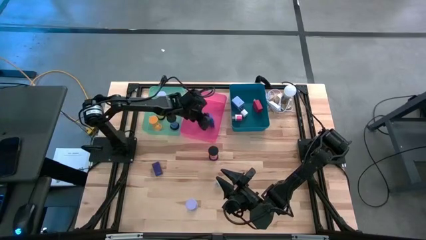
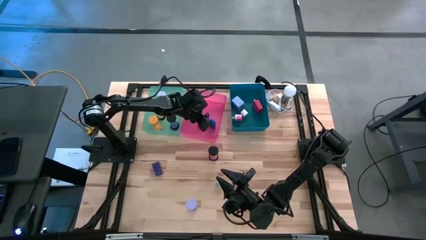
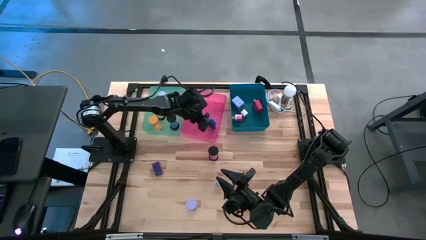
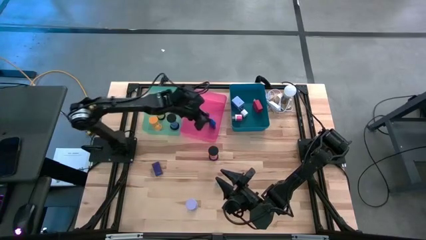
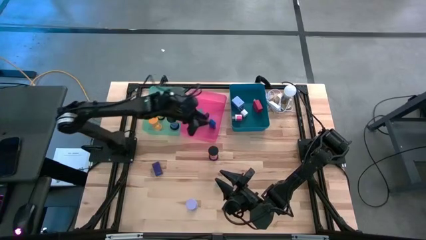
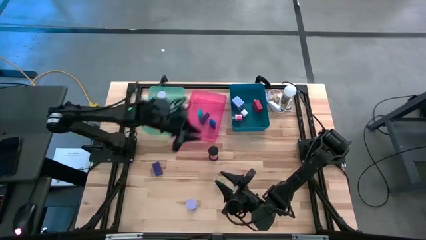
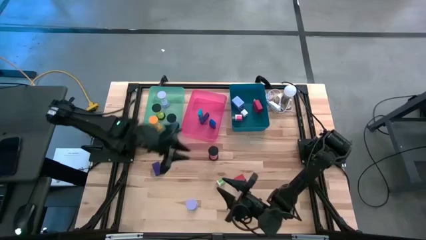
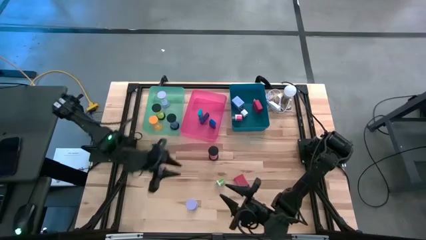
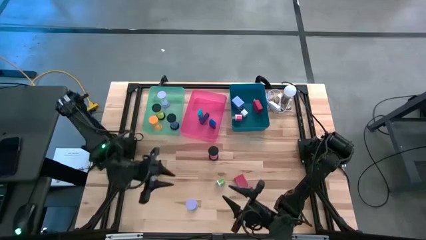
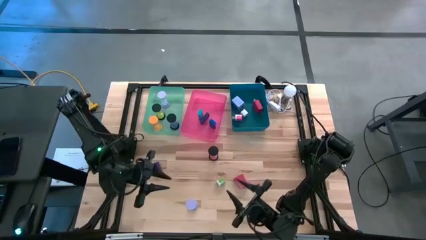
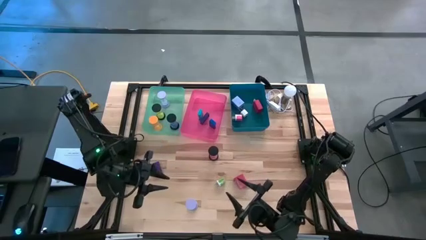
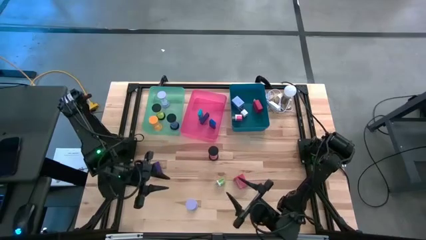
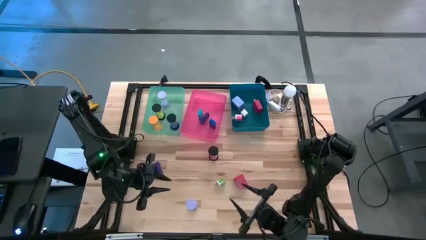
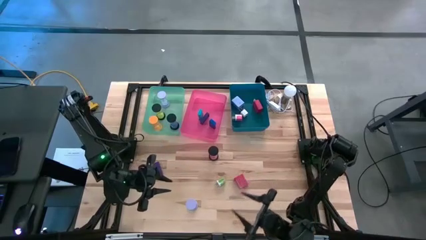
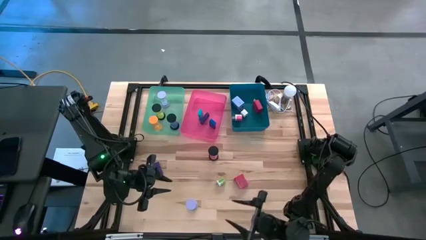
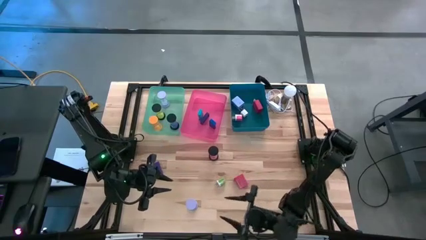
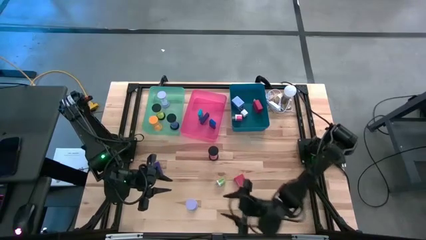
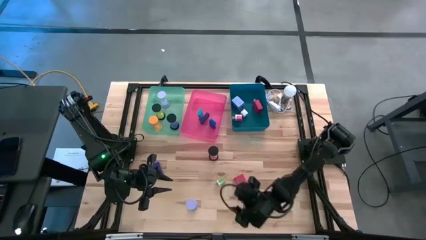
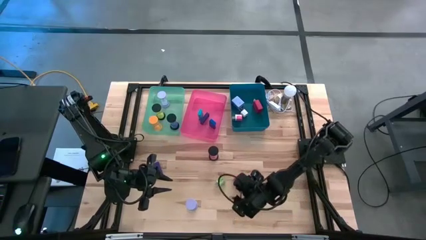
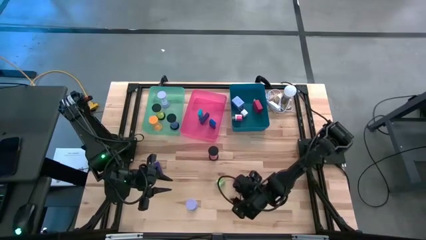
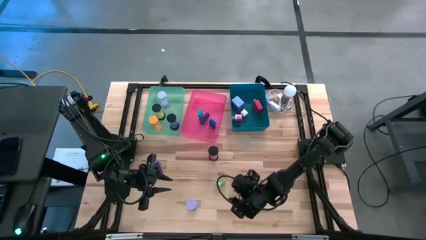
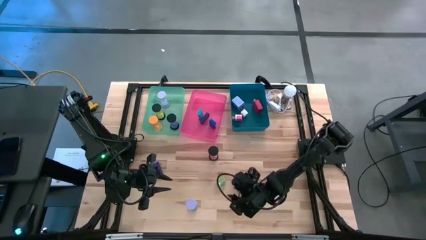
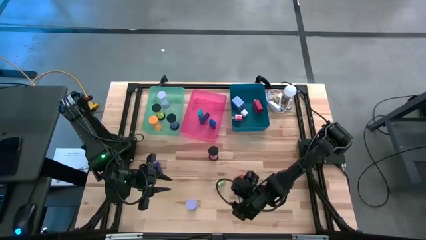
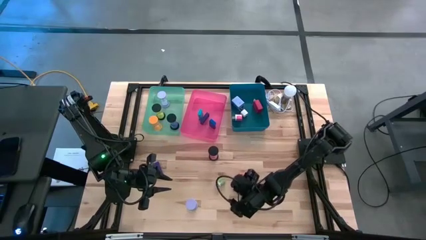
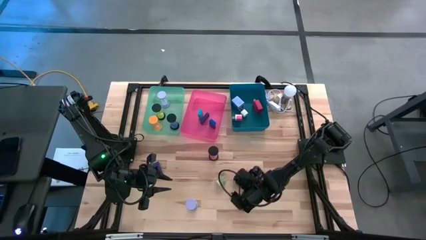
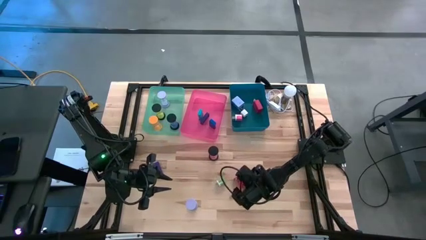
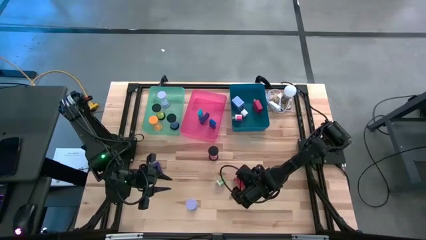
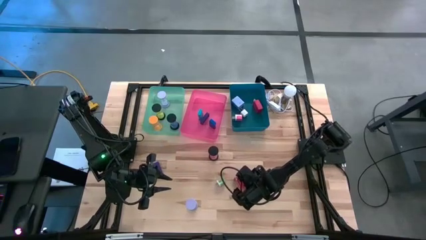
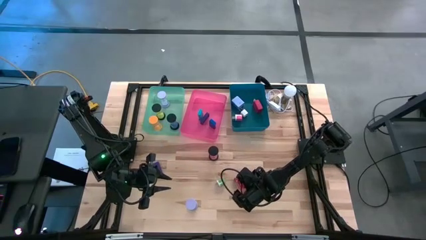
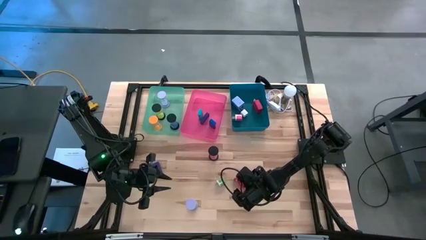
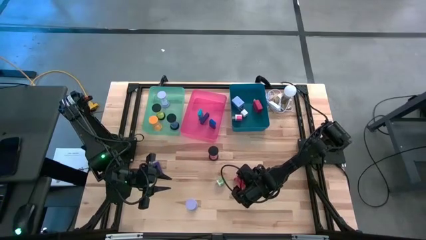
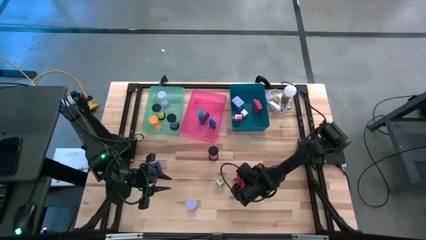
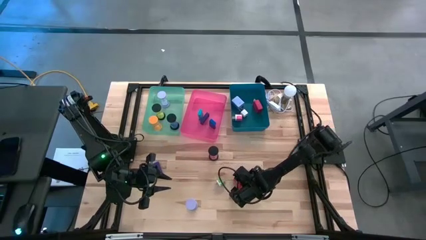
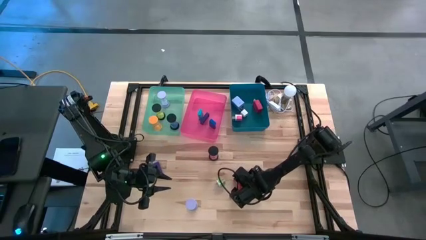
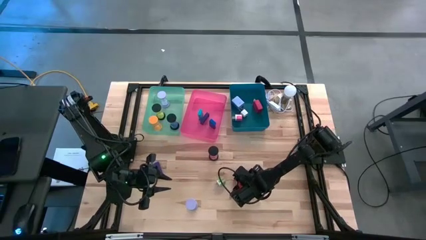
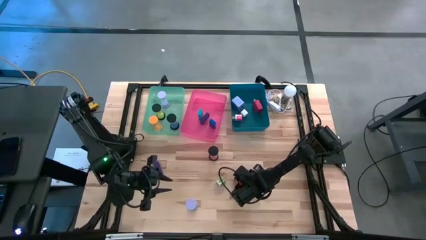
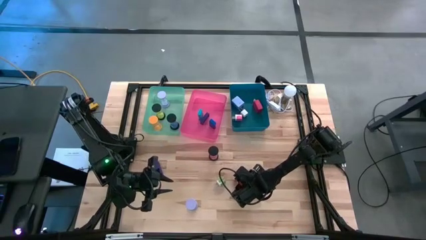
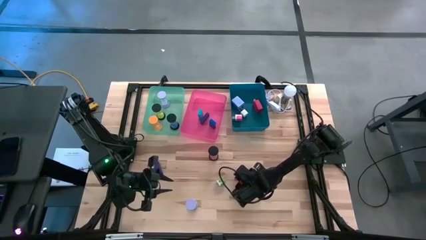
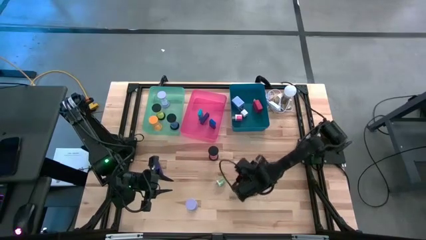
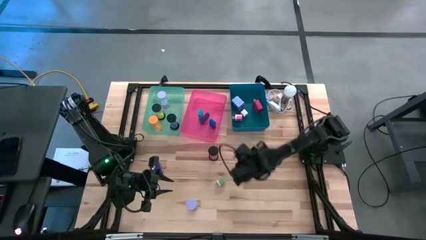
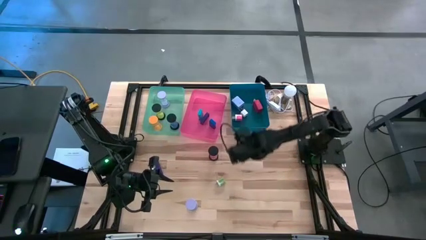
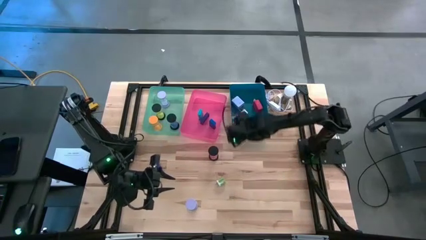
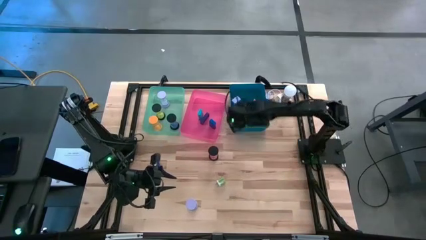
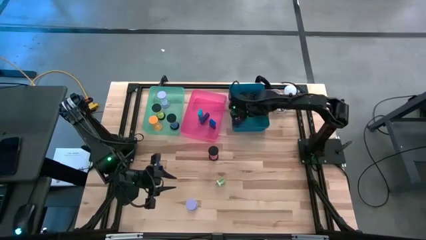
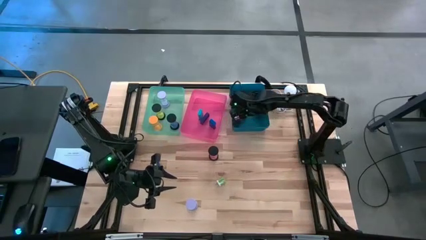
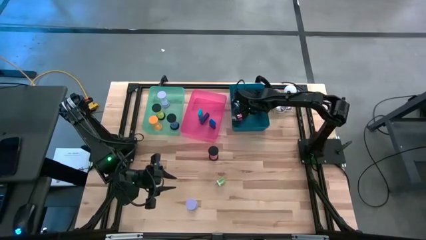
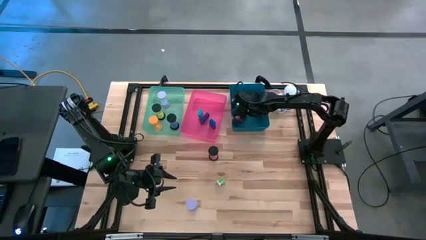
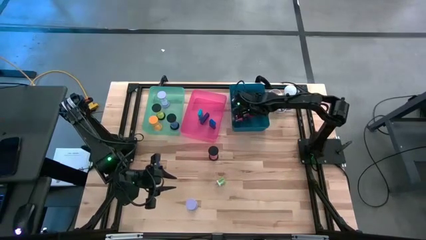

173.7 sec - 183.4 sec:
Task: Pick & Place Office items
Put the red charger adapter into the blue bin

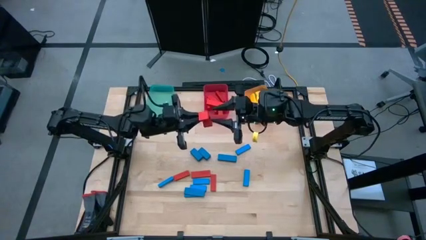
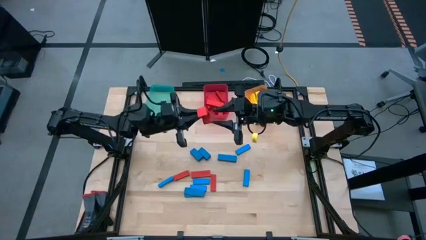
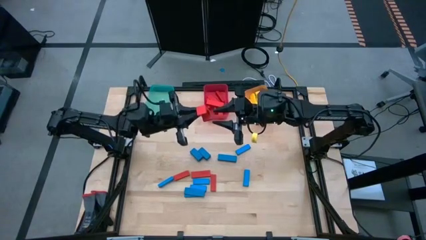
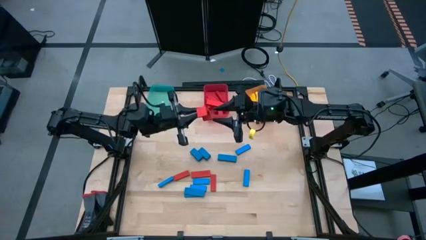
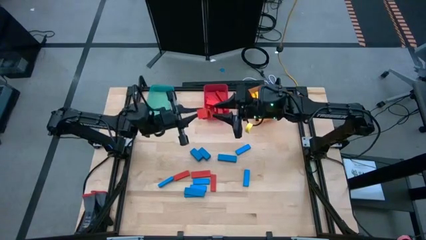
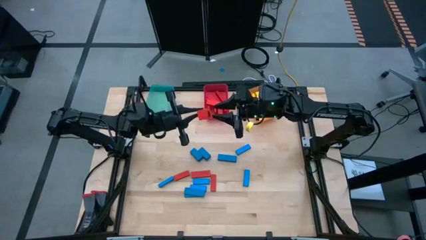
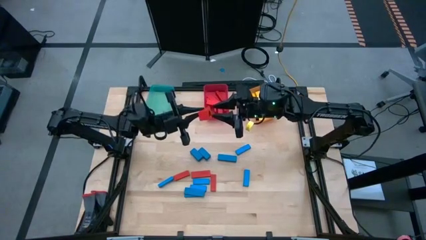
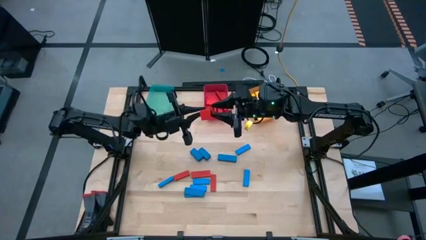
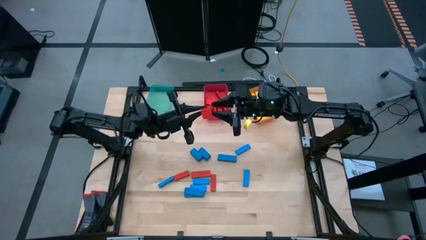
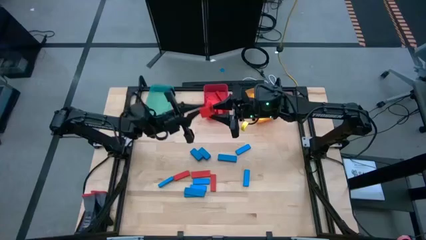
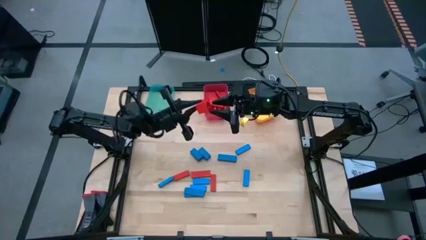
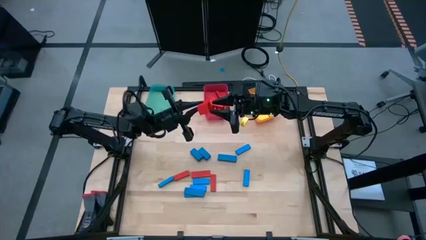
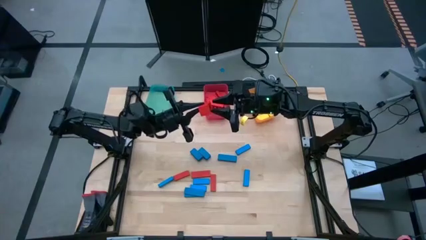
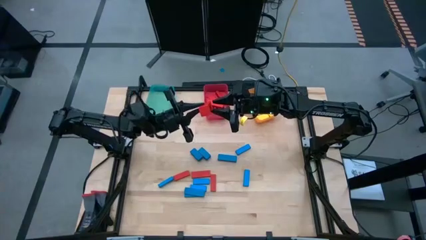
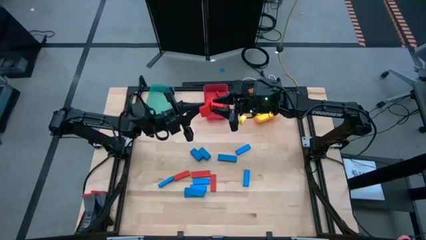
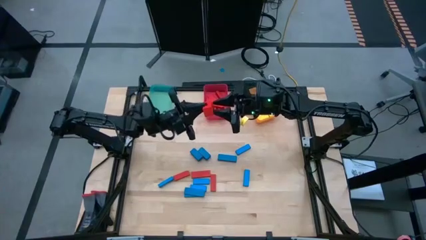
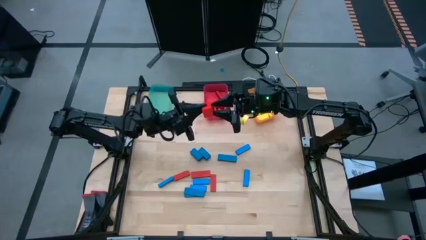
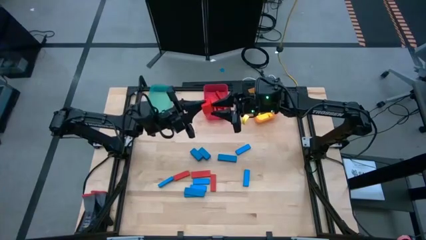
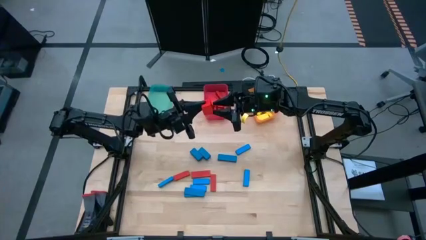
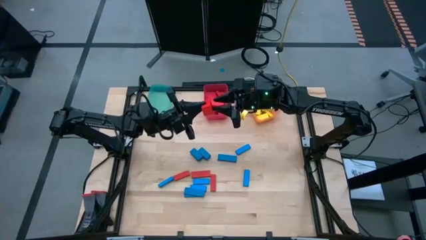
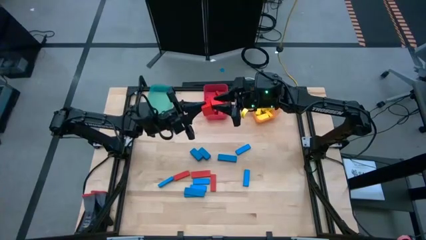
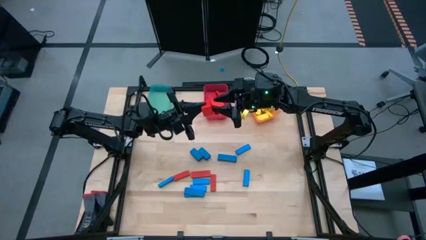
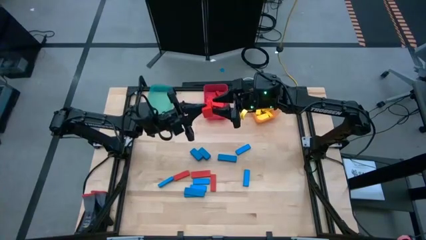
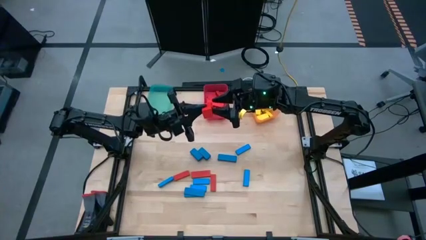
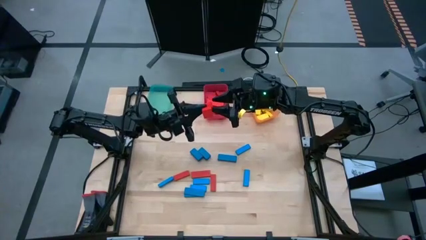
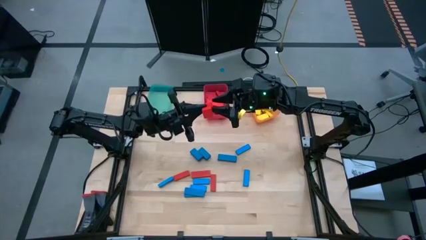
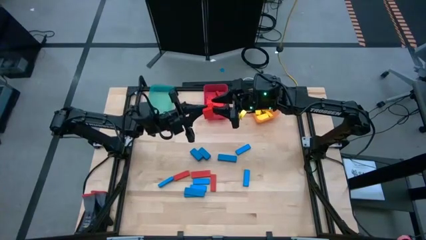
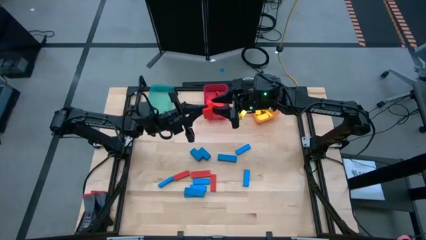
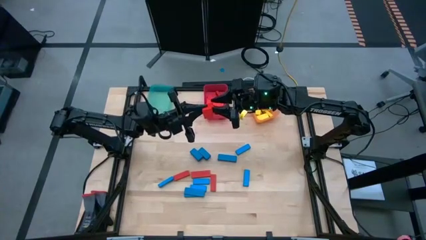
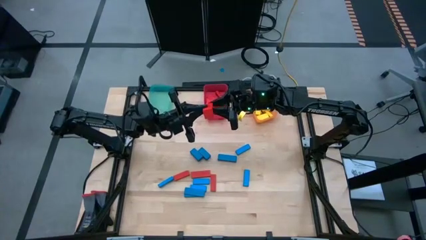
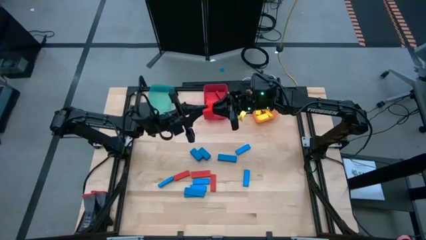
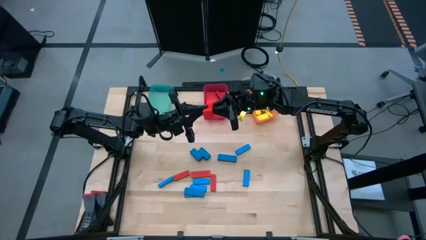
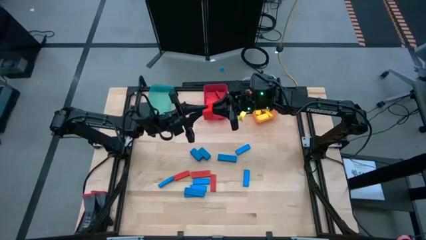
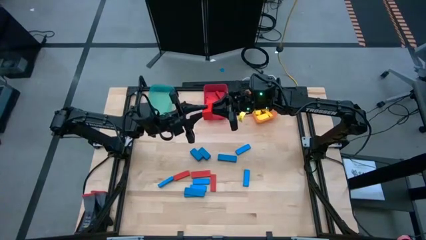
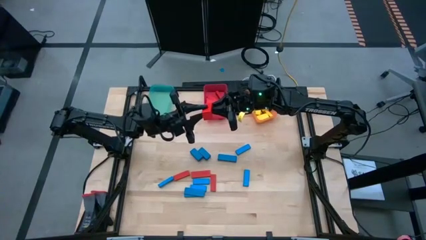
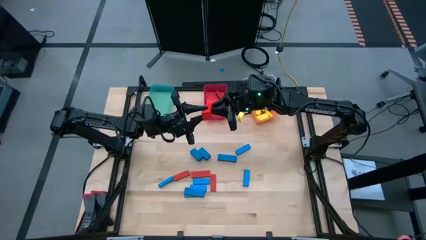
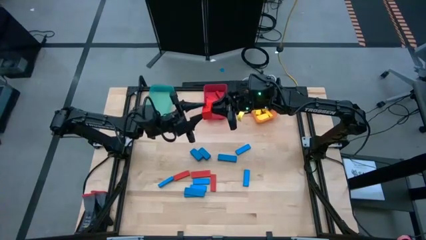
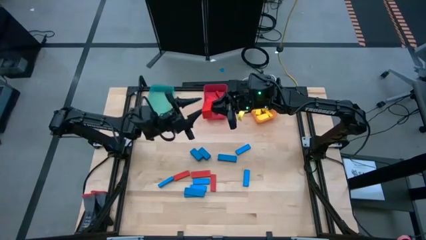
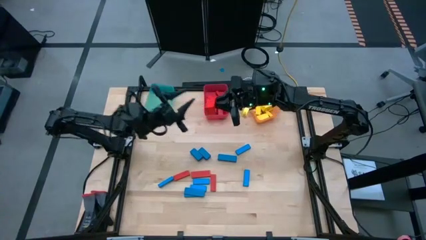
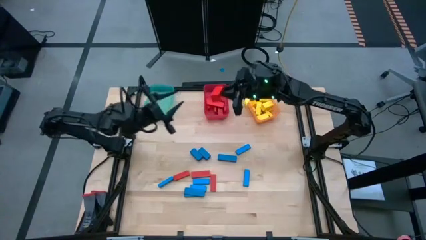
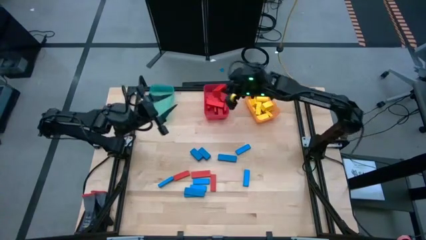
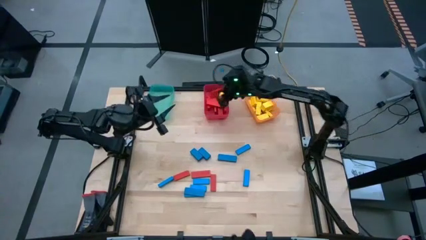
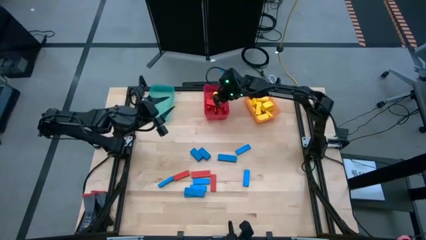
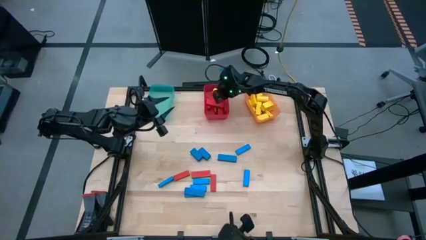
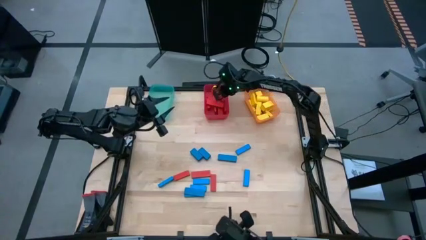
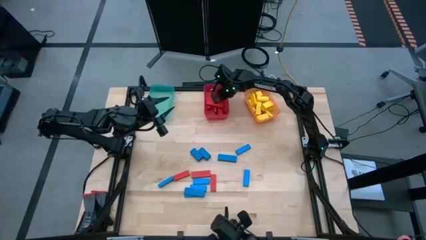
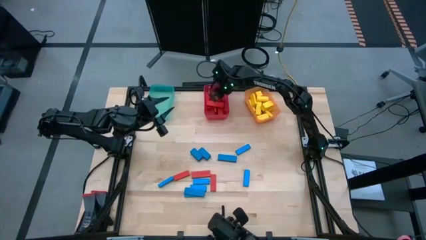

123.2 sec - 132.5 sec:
Task: Sort blocks
Put the red block into the red bin
